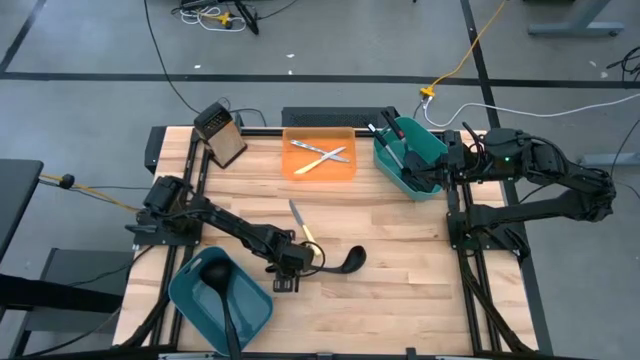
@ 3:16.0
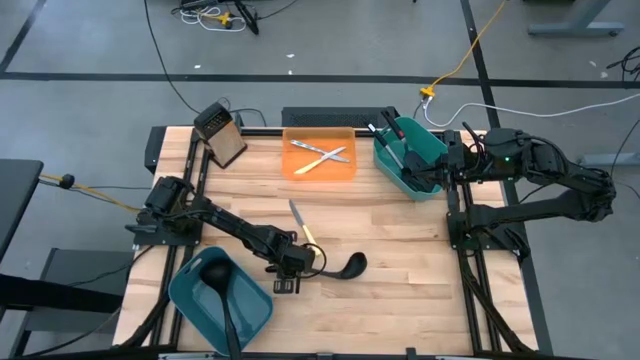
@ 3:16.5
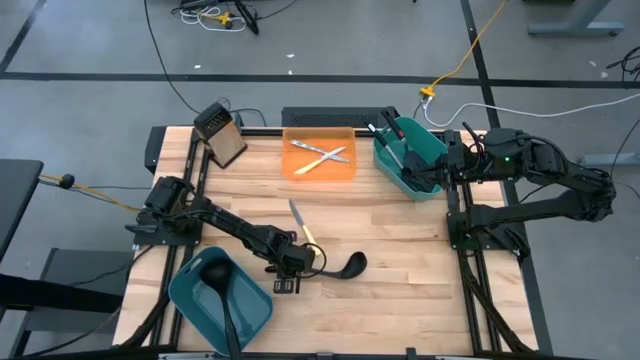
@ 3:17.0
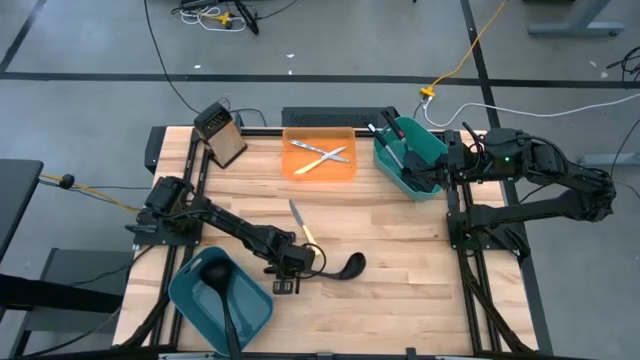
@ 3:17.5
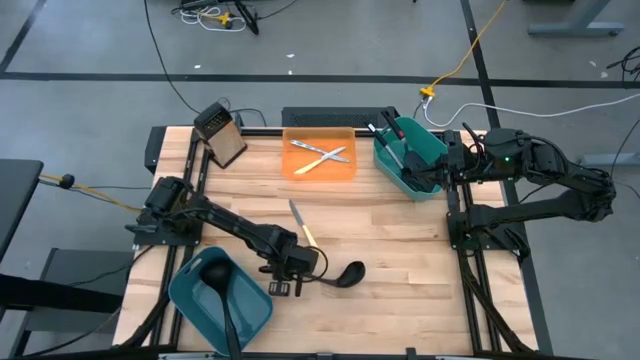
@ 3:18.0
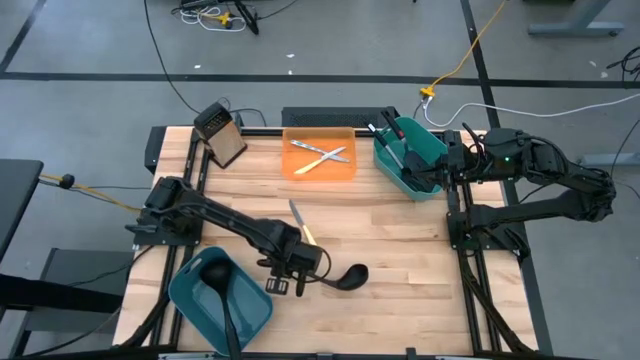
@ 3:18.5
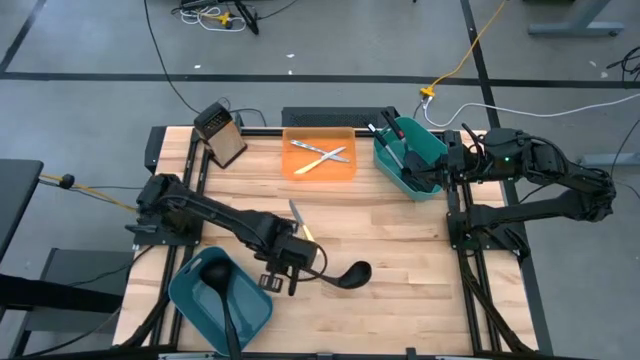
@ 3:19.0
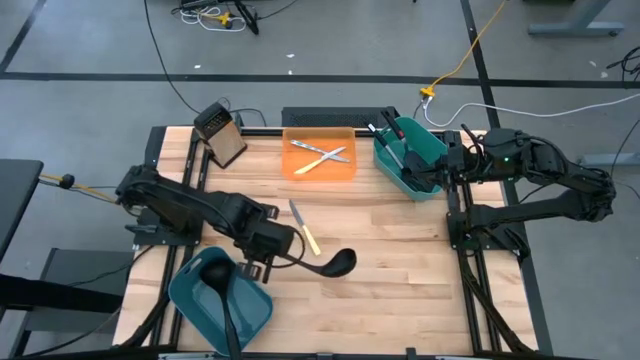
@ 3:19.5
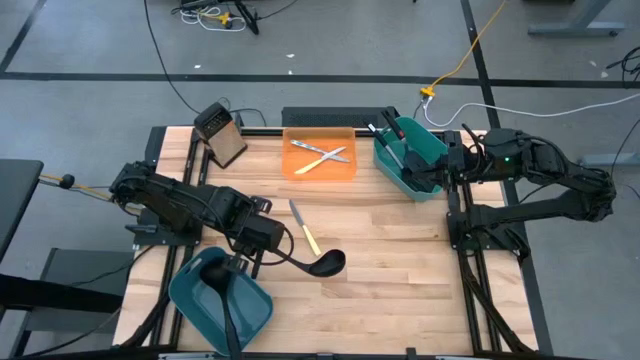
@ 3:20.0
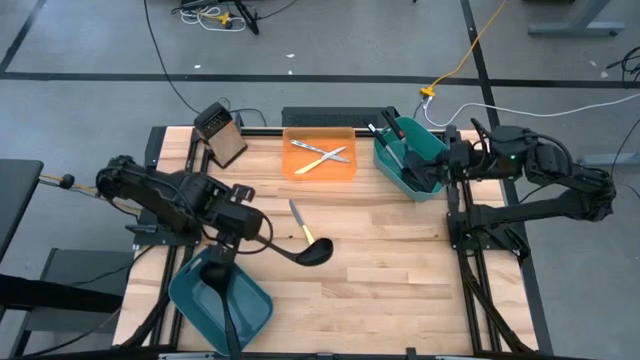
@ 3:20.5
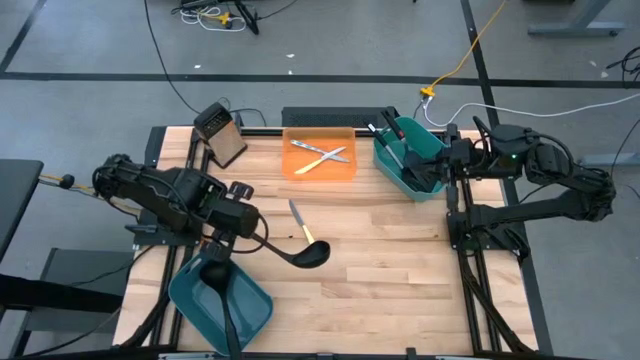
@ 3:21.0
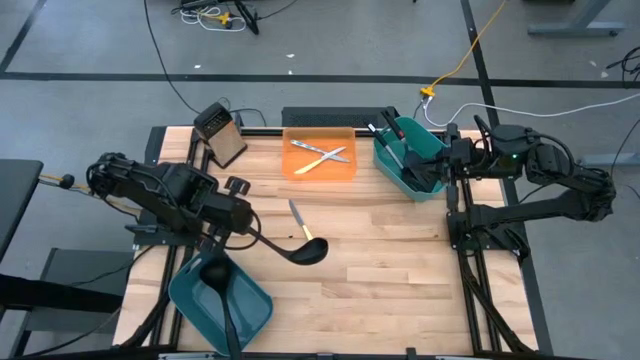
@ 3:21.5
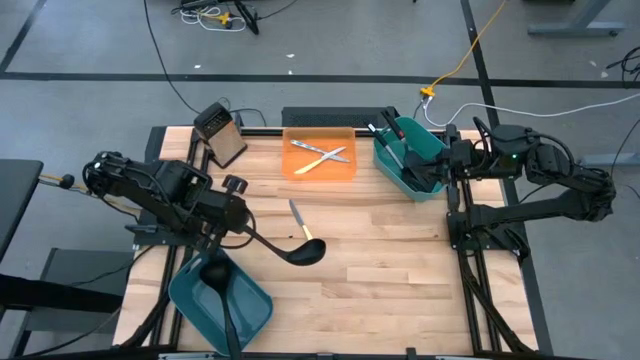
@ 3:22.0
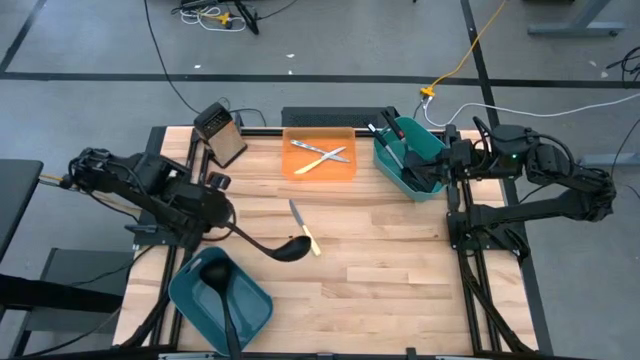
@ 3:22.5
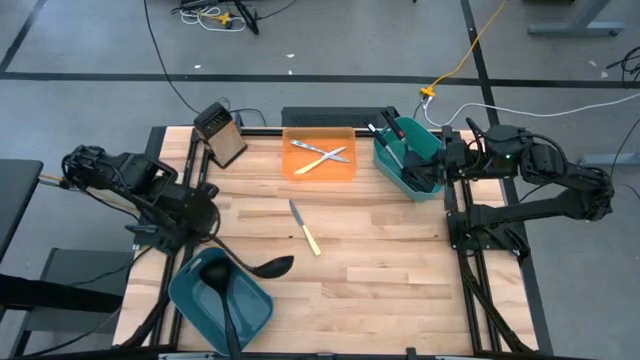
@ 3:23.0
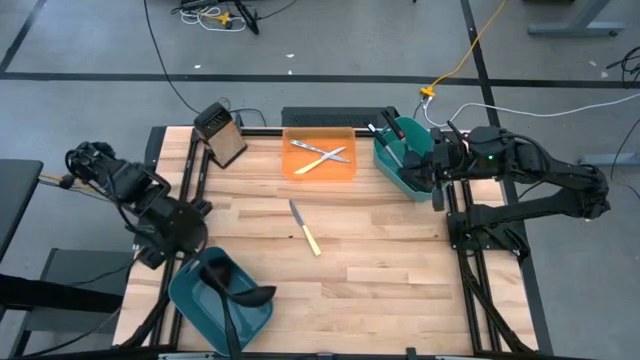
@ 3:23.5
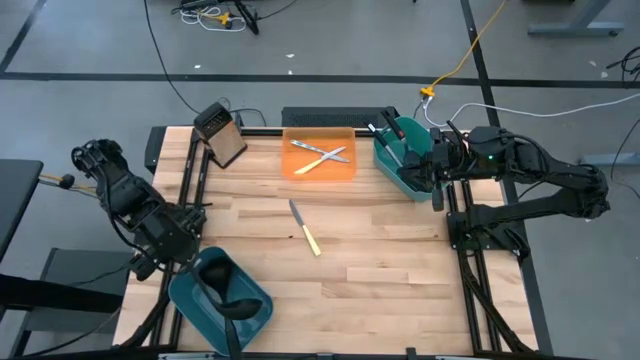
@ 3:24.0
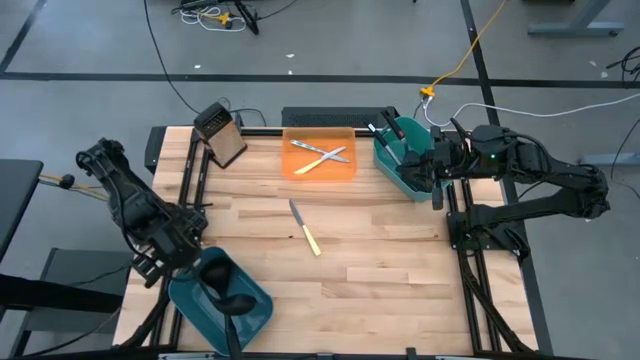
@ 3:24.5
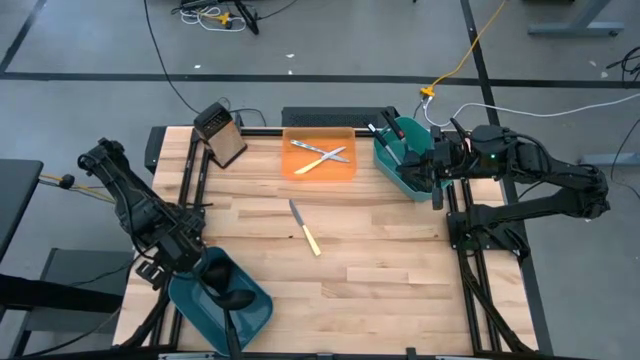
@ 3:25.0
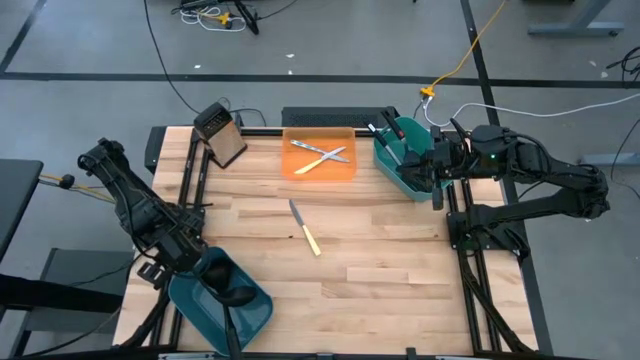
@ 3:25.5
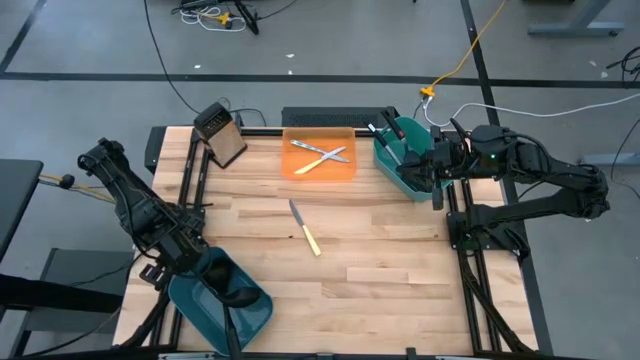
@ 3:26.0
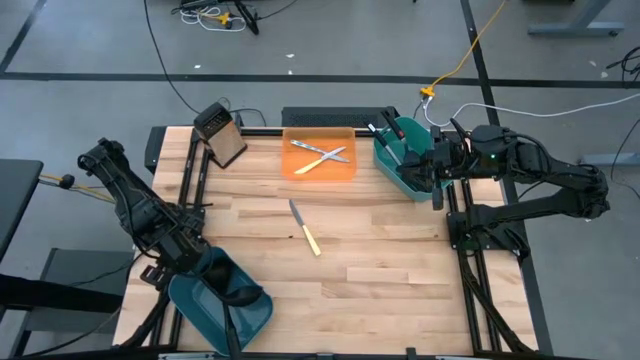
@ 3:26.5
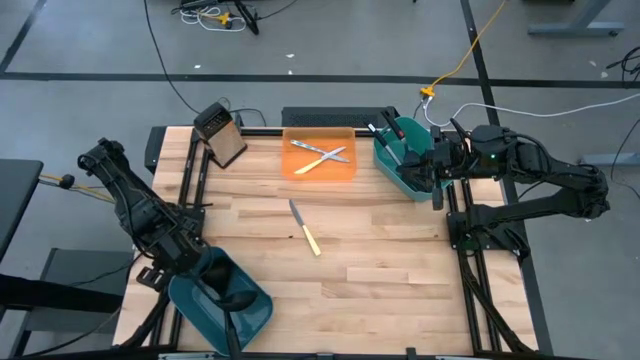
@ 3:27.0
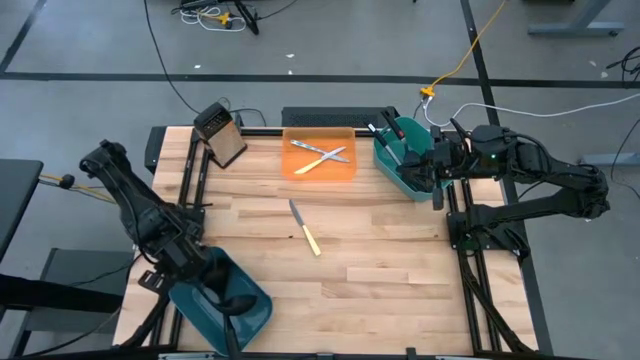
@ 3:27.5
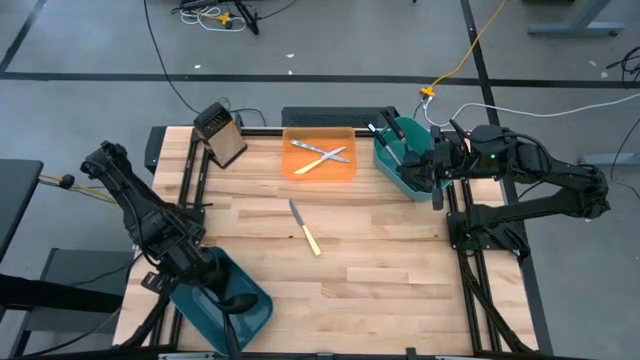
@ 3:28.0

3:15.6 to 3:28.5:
Task: Pick & Place Kitchen Items
Put the black ladle into the blue bin

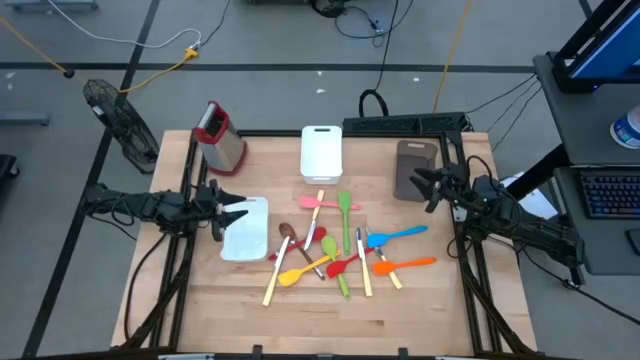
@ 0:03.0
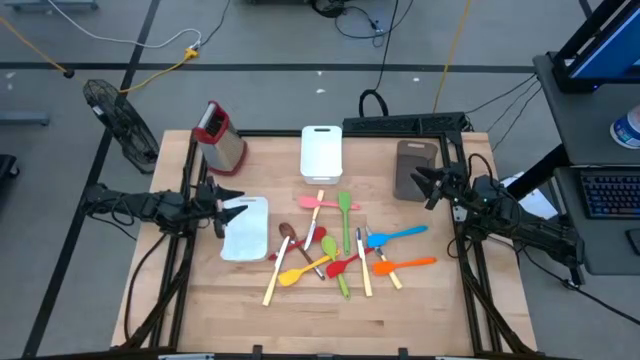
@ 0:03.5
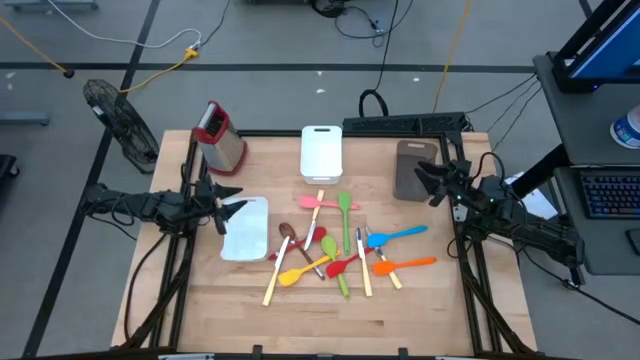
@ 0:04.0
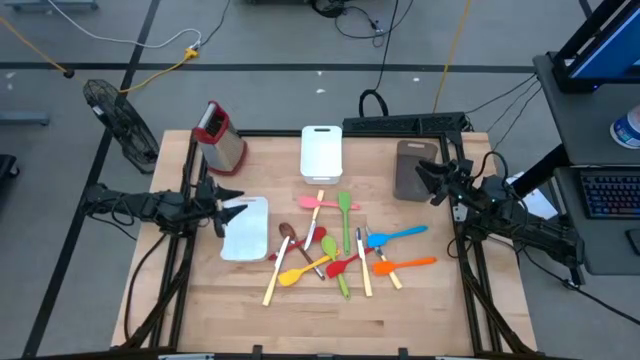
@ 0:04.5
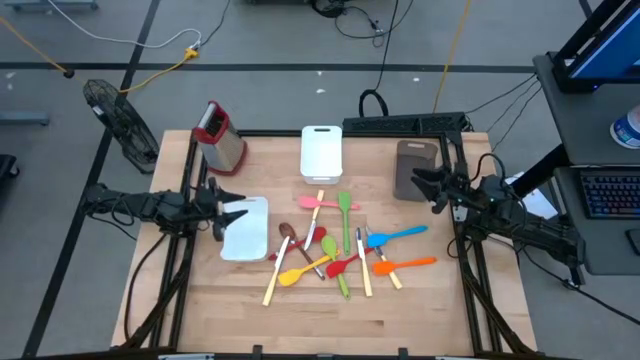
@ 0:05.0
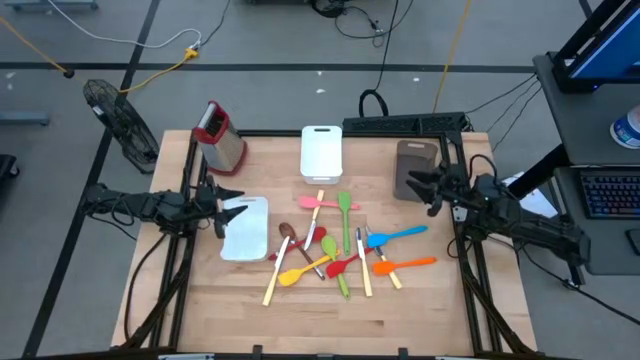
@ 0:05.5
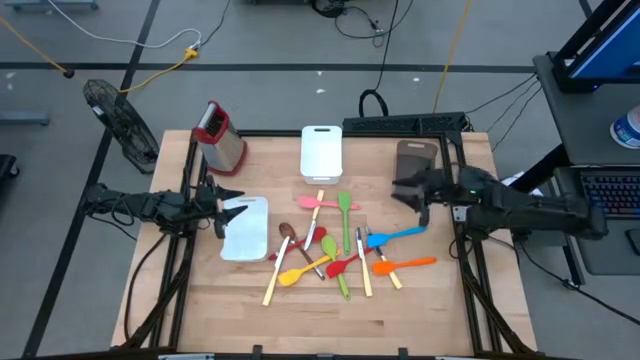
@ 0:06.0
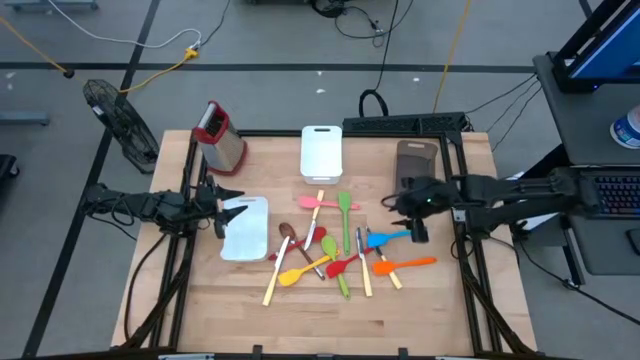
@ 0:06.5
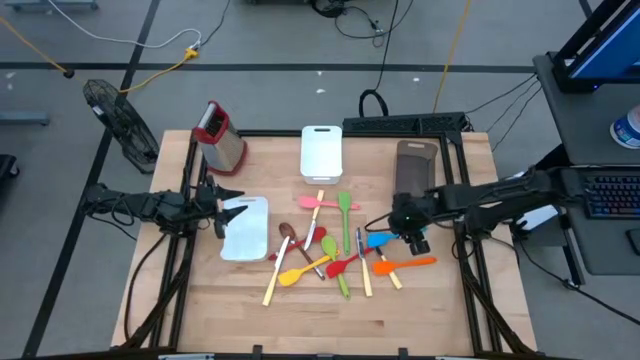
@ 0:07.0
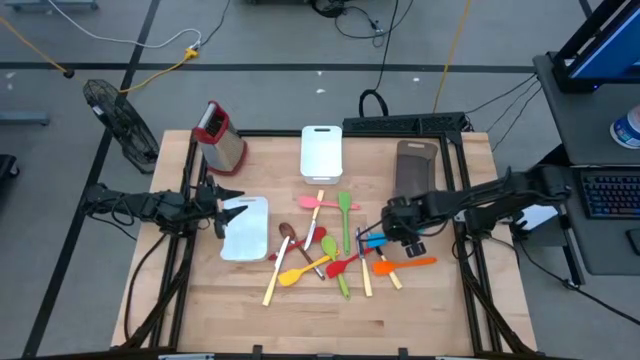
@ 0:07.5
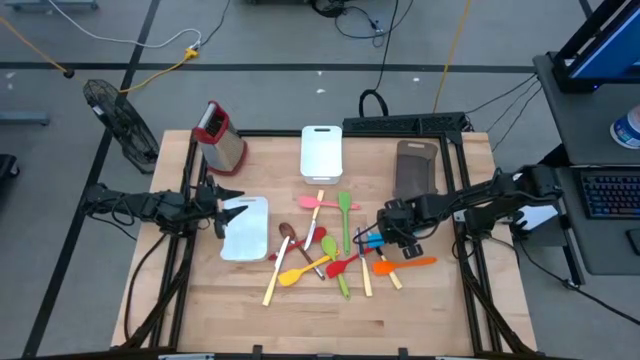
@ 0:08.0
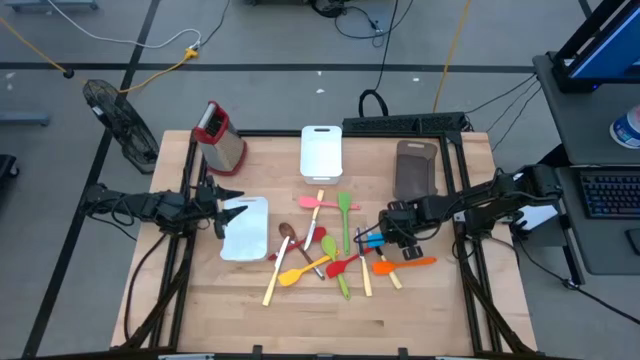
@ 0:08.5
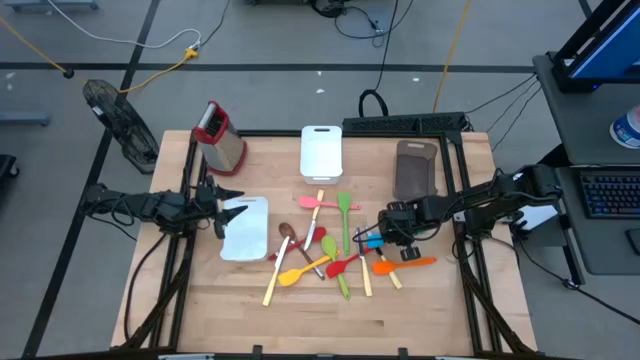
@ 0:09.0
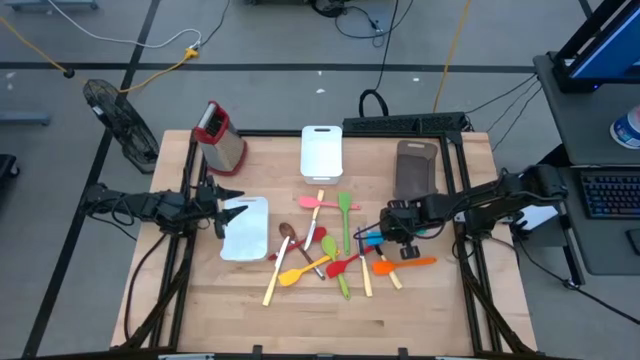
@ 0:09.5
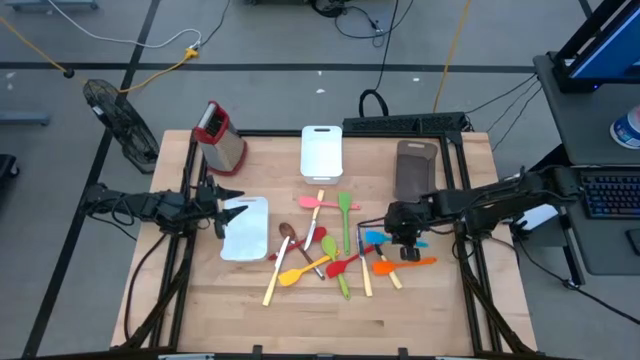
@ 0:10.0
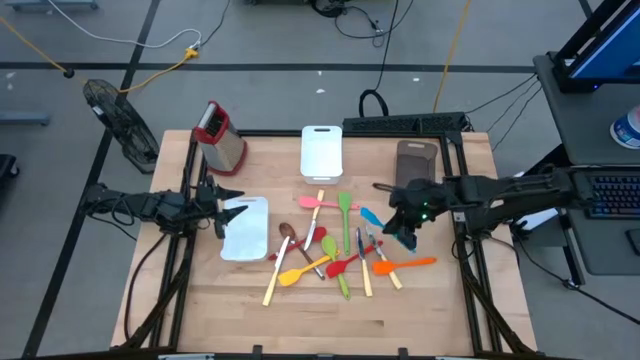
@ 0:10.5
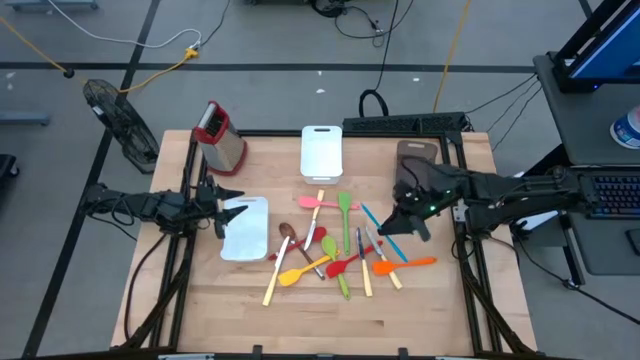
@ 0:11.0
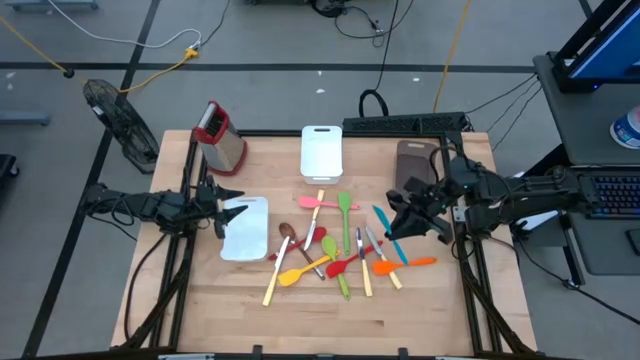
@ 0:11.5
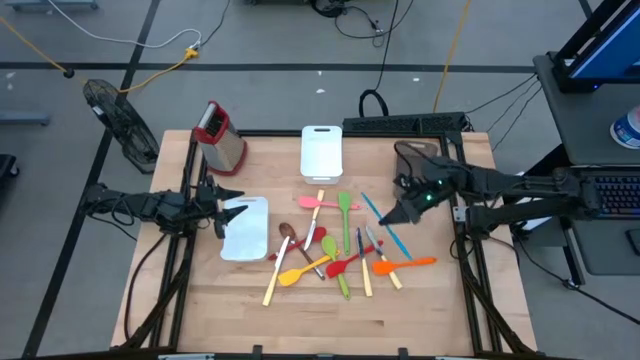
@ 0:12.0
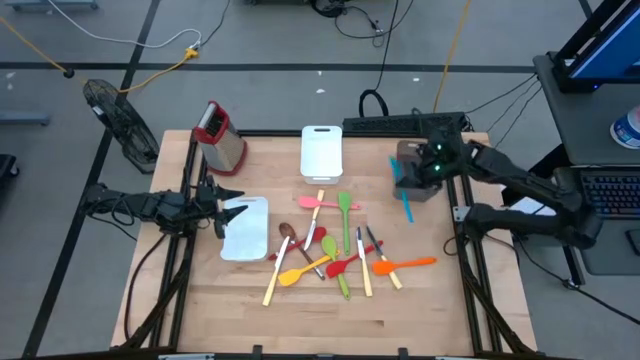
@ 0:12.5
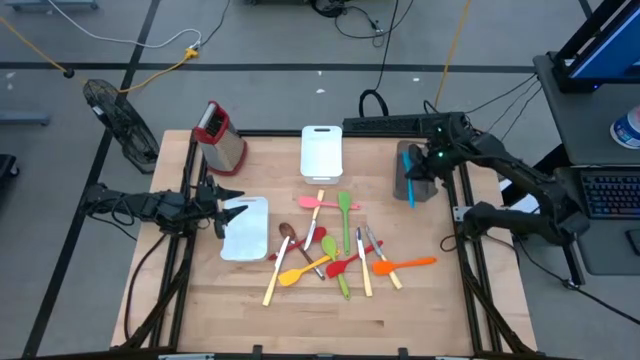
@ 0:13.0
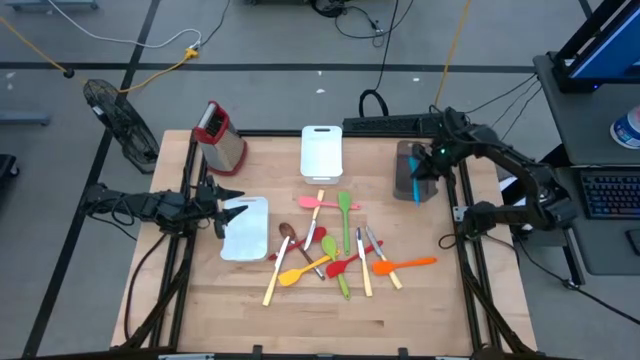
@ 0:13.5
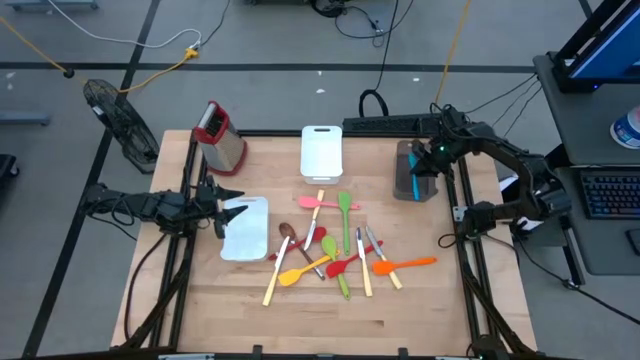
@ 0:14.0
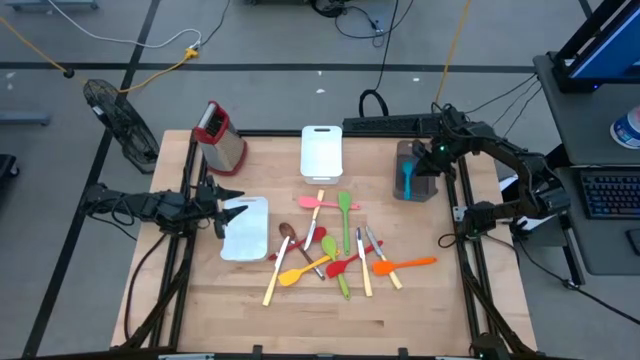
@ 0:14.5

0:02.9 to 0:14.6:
Task: Pick & Place Kitchen Items
Put the blue spatula into the black bin
